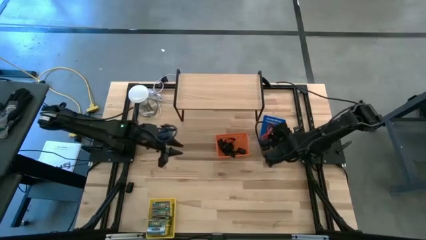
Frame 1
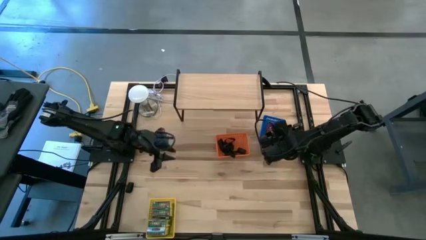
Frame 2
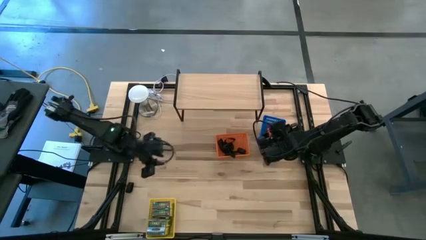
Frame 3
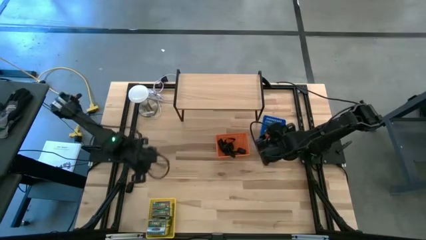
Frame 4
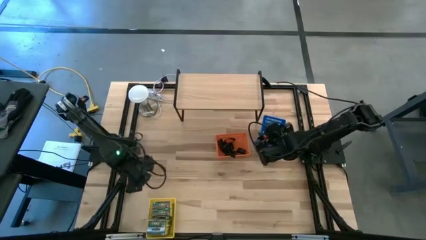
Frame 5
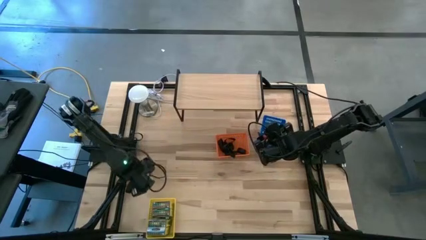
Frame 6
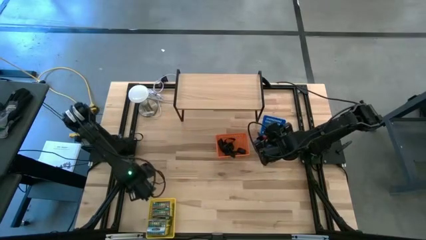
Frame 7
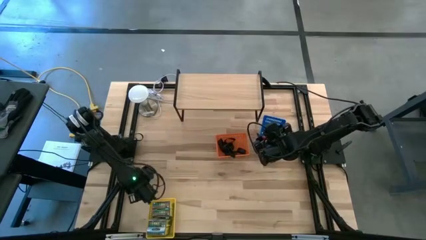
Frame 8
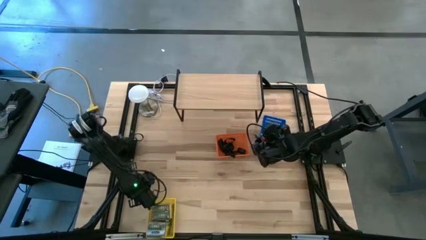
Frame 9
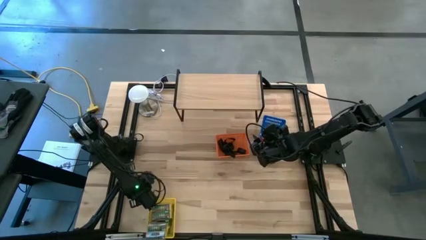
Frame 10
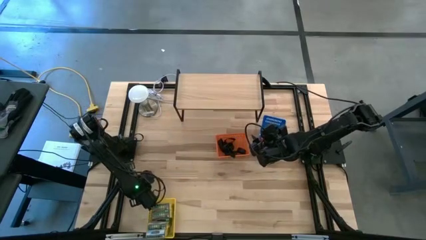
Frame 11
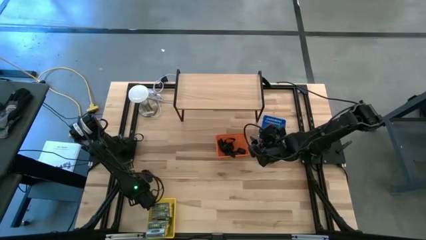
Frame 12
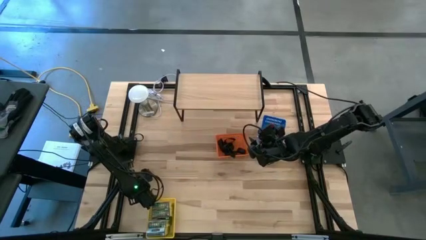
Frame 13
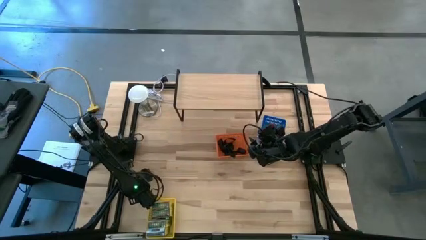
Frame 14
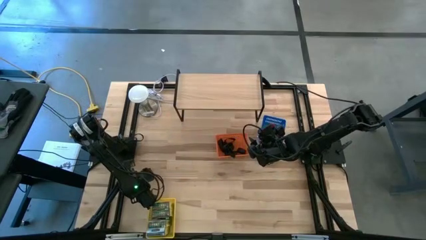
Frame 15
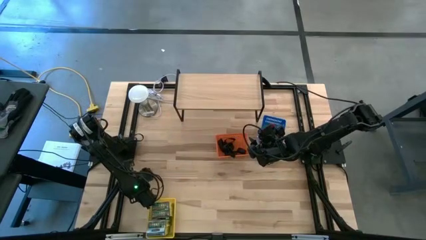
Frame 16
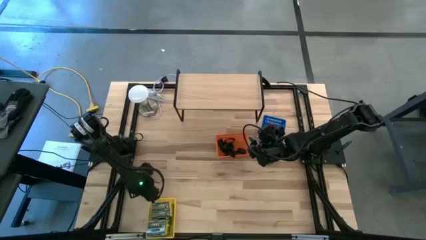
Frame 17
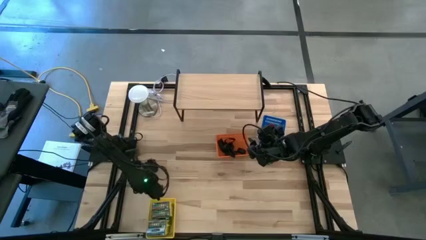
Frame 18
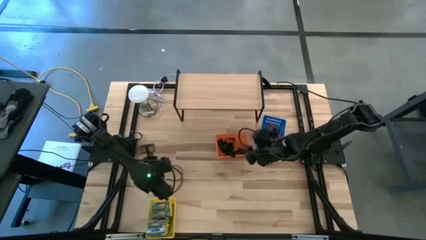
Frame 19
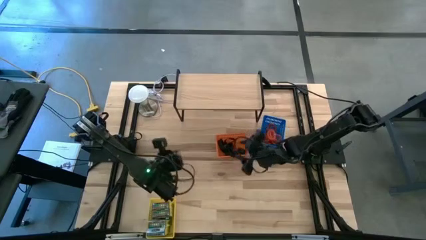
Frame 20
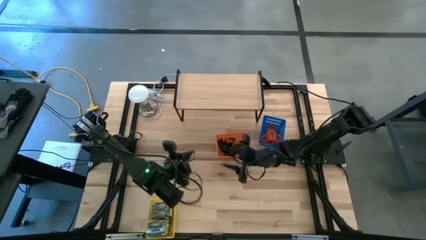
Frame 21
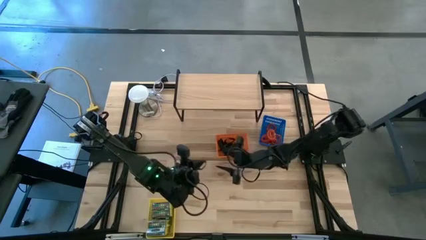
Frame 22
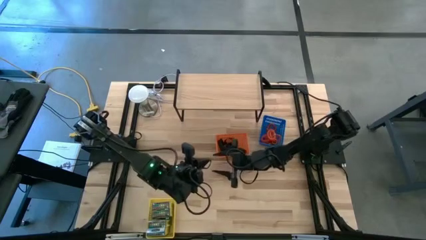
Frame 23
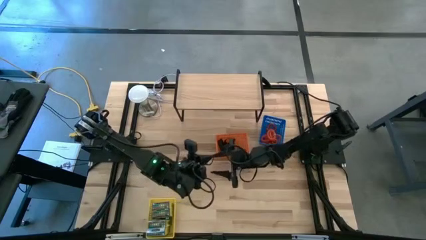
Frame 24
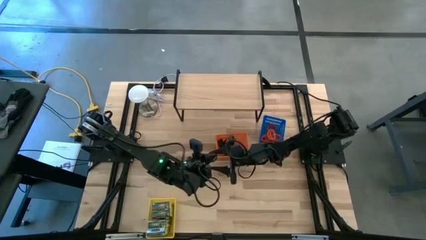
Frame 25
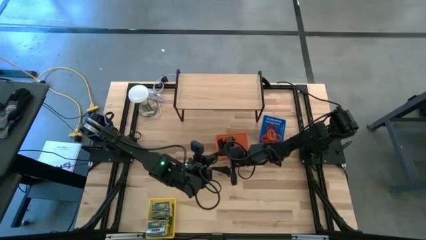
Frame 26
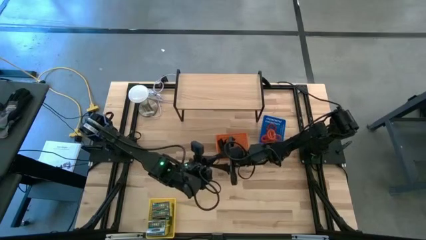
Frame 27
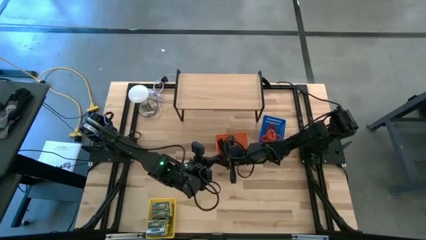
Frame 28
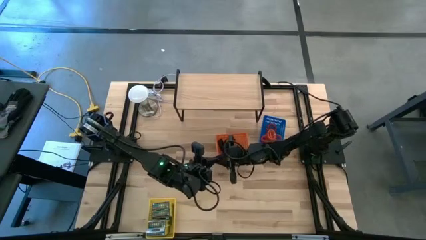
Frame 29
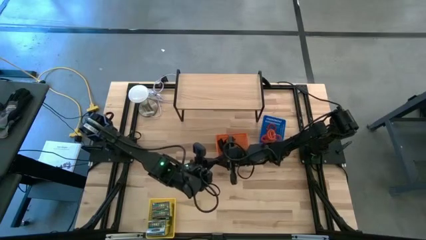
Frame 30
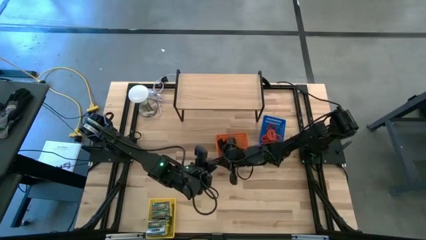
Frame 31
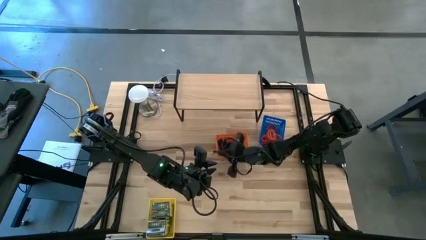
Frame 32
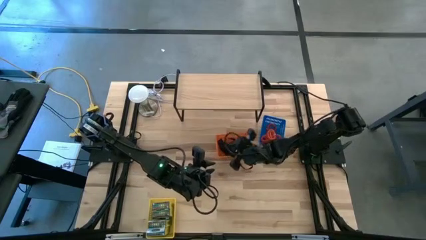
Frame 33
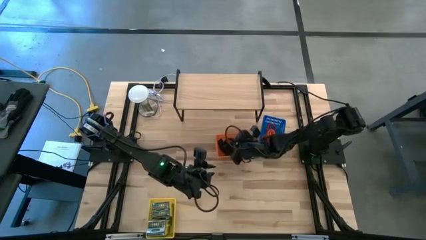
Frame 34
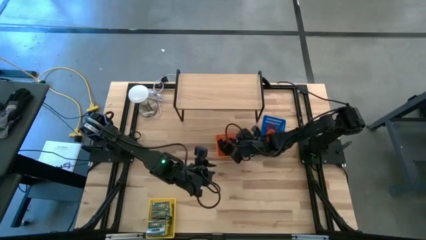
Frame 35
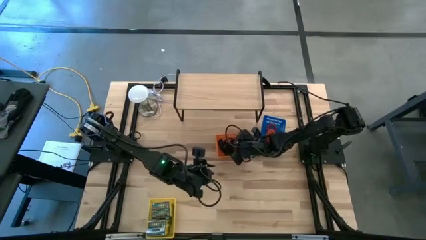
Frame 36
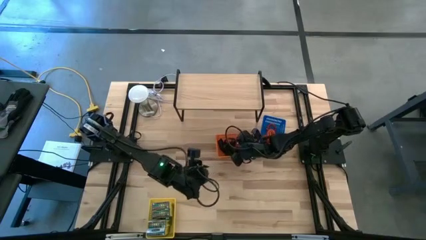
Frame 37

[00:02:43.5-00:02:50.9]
Task: Pick & Place Office Desk Supplies
Put the rubberband into the orange bin

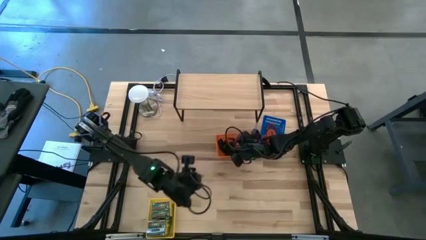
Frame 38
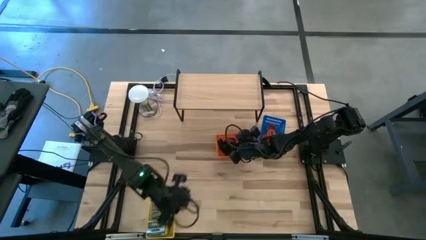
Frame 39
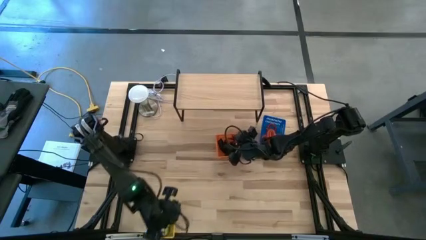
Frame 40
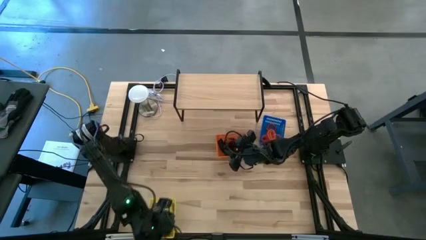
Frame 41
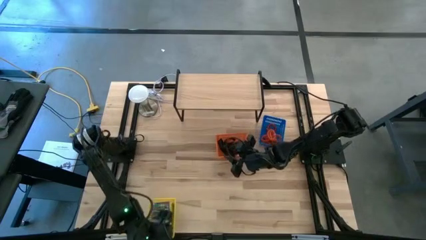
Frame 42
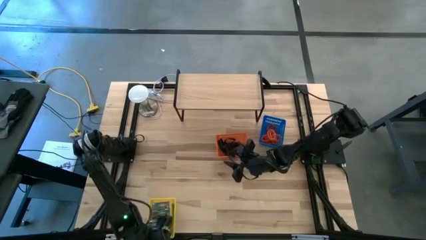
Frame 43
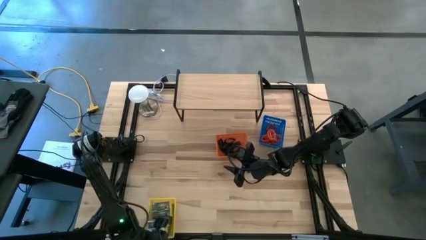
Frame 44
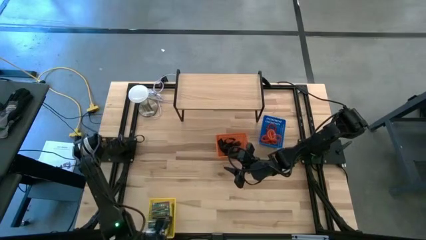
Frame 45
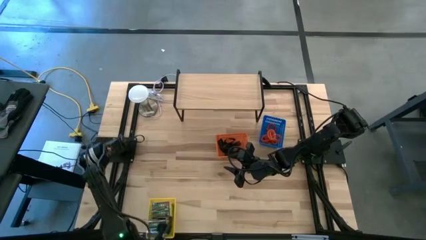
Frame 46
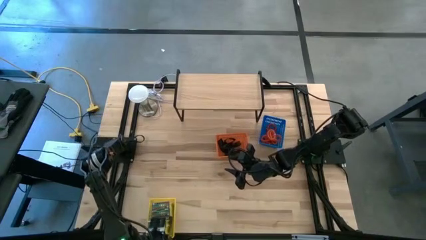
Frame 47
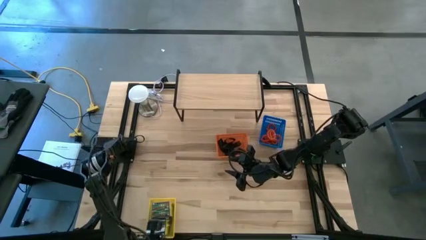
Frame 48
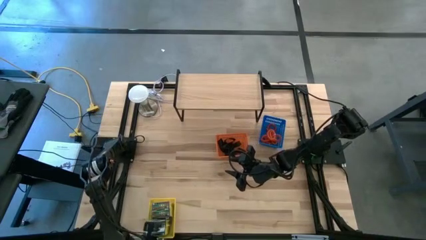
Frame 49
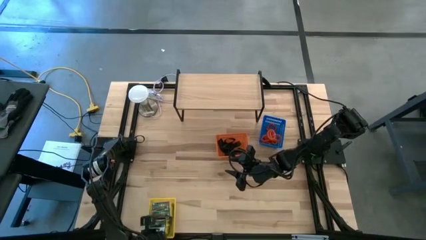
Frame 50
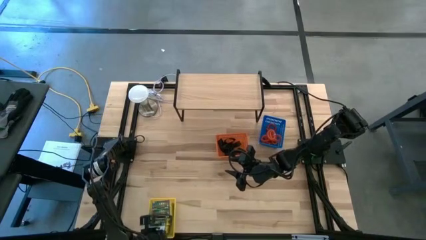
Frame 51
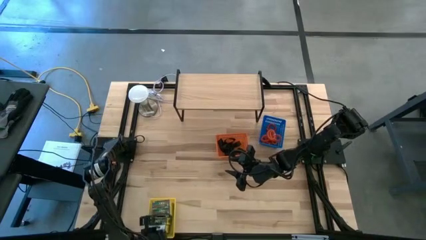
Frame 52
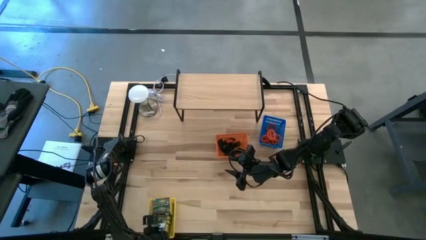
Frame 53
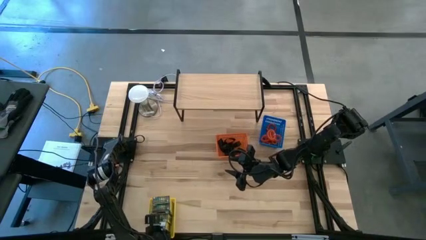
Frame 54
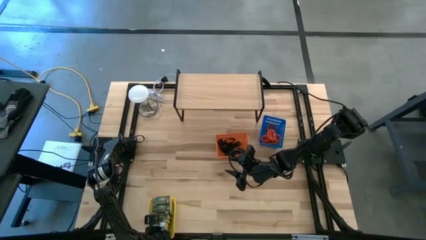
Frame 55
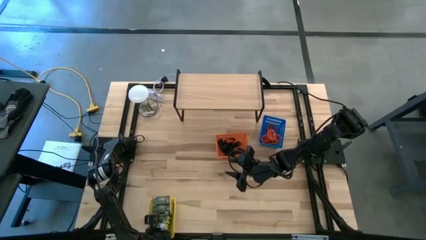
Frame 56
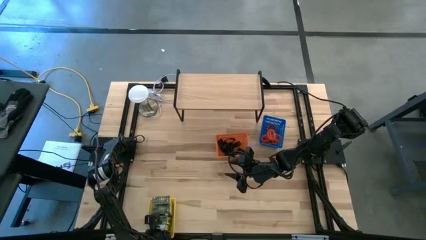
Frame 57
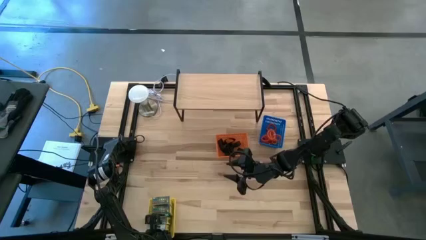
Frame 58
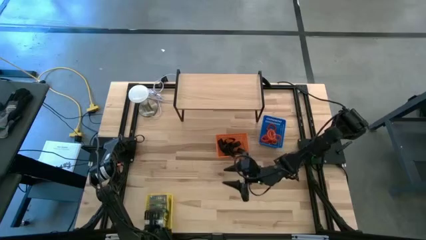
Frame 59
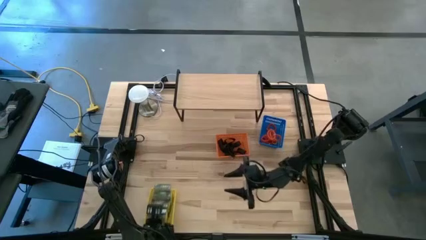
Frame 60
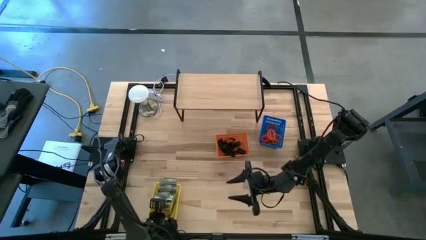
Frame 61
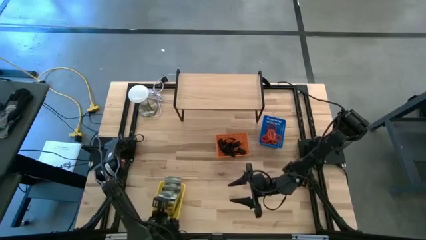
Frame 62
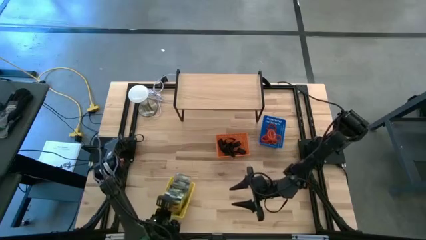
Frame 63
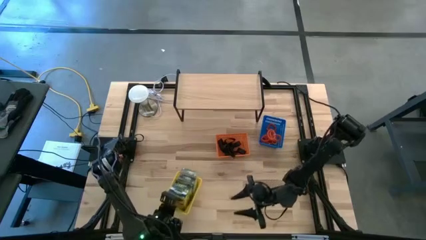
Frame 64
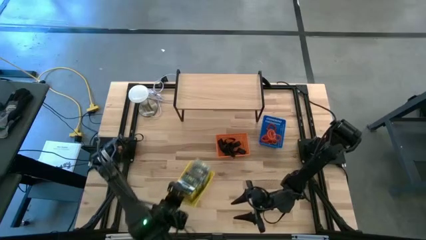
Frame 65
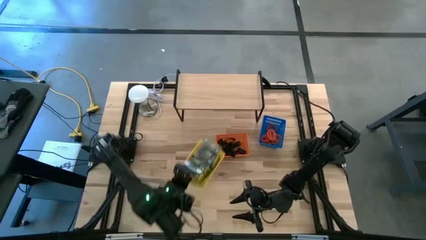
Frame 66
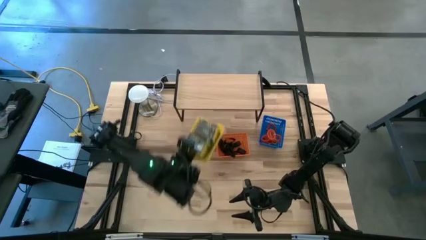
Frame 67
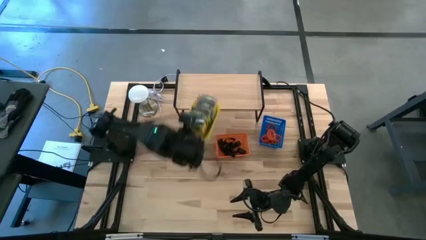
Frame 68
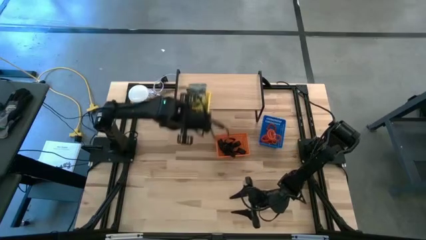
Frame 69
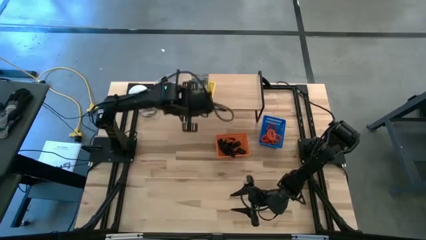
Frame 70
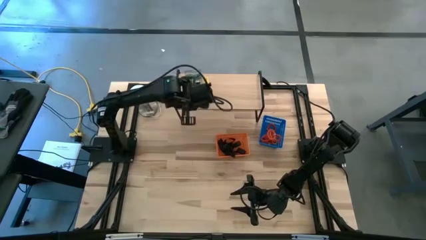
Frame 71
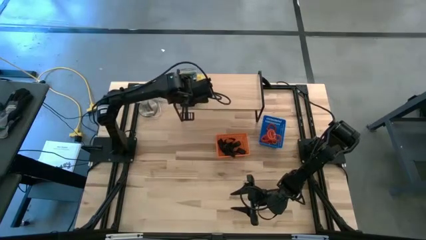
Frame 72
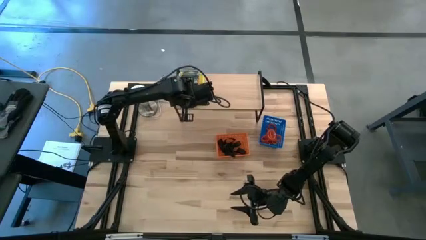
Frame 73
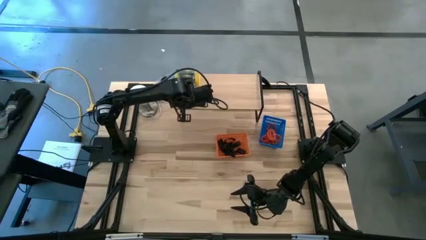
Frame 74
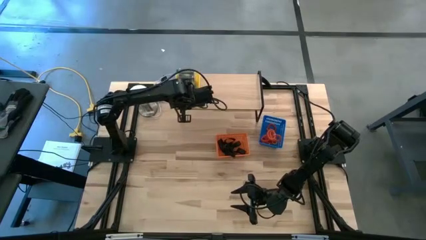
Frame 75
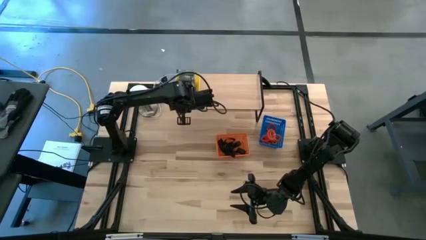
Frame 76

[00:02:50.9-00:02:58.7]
Put the yellow bin with crayon boxes on the shelf
